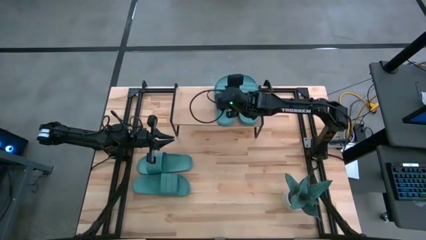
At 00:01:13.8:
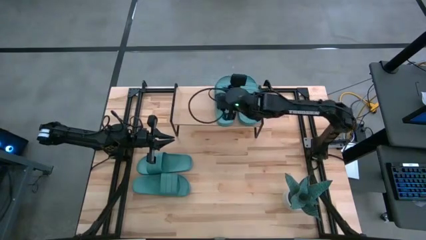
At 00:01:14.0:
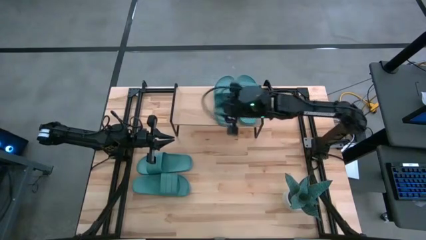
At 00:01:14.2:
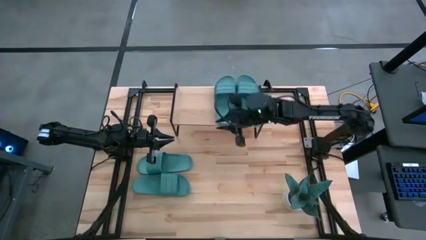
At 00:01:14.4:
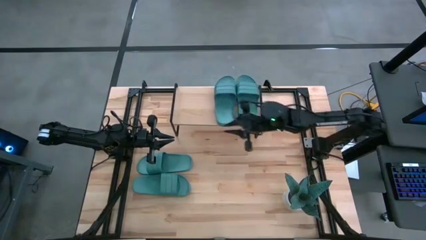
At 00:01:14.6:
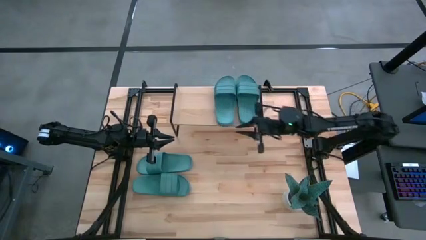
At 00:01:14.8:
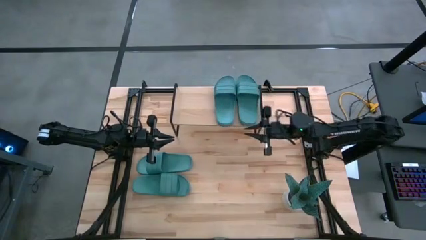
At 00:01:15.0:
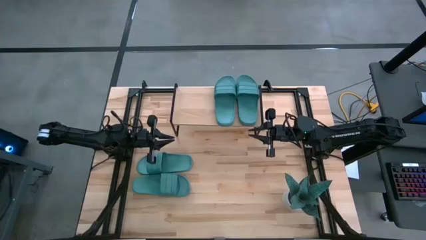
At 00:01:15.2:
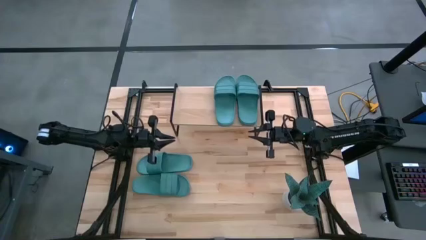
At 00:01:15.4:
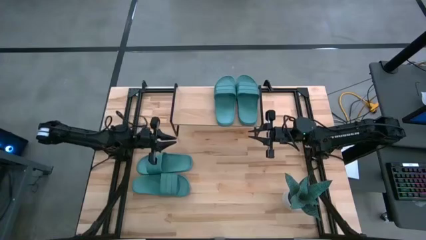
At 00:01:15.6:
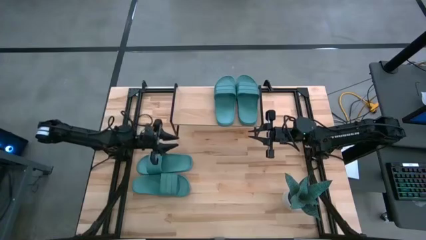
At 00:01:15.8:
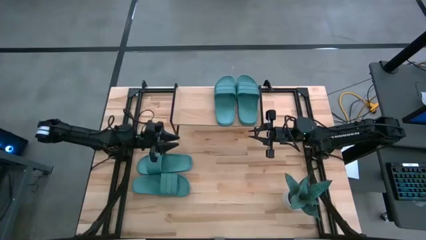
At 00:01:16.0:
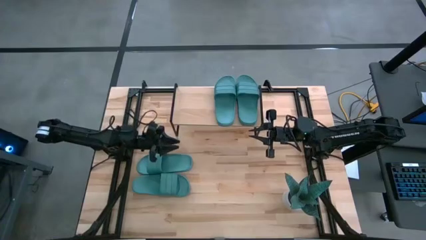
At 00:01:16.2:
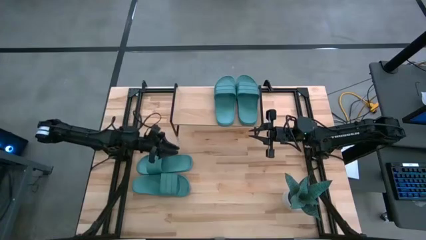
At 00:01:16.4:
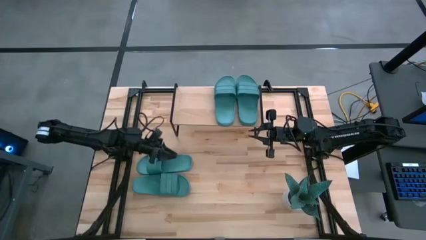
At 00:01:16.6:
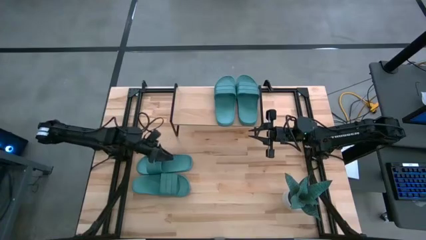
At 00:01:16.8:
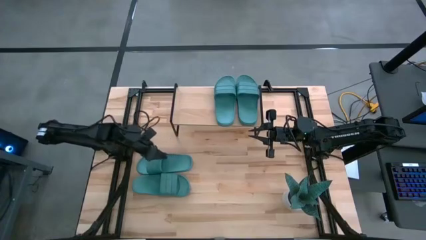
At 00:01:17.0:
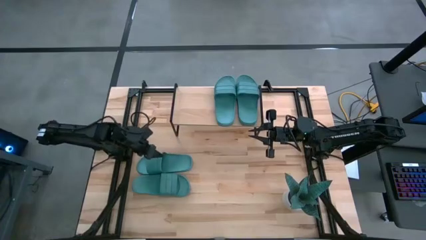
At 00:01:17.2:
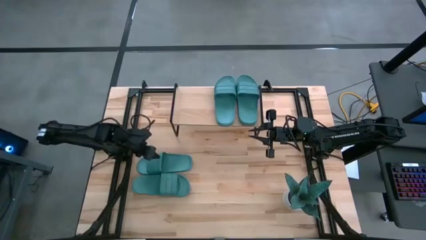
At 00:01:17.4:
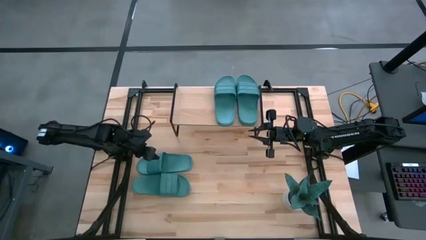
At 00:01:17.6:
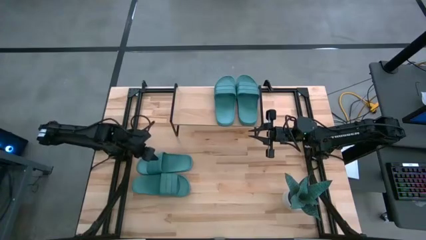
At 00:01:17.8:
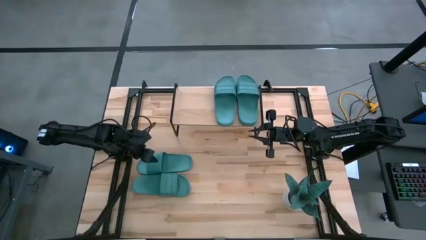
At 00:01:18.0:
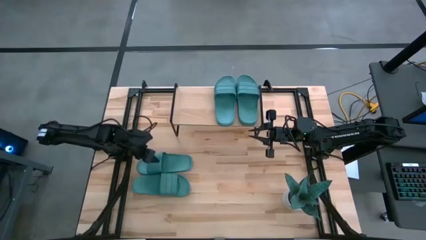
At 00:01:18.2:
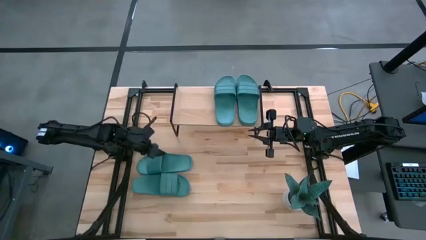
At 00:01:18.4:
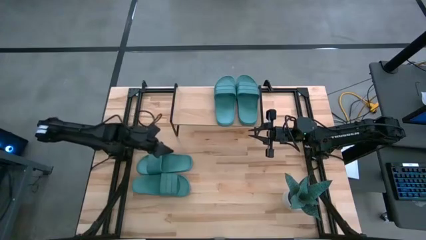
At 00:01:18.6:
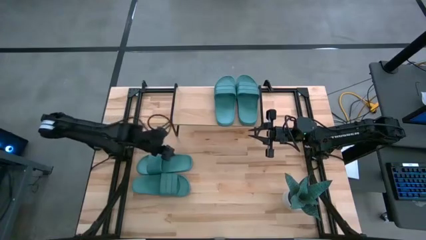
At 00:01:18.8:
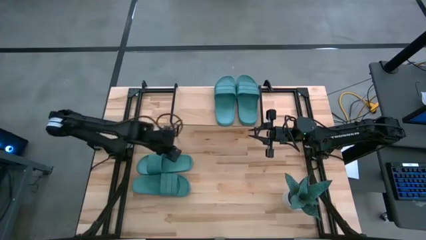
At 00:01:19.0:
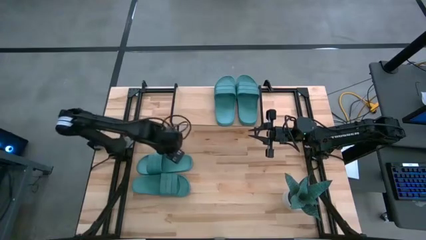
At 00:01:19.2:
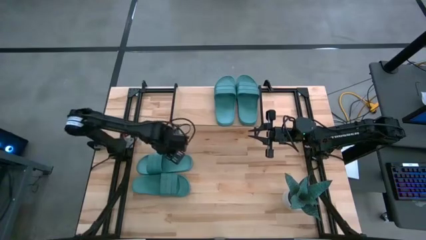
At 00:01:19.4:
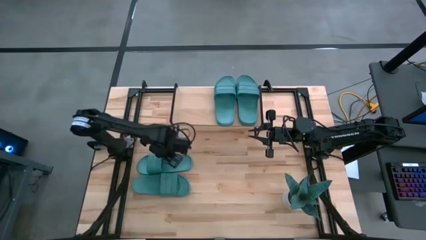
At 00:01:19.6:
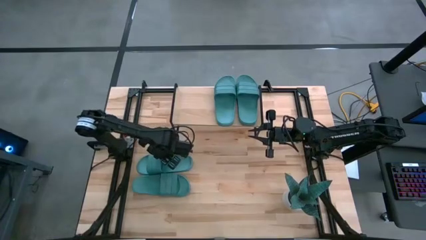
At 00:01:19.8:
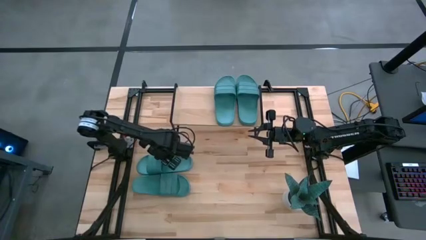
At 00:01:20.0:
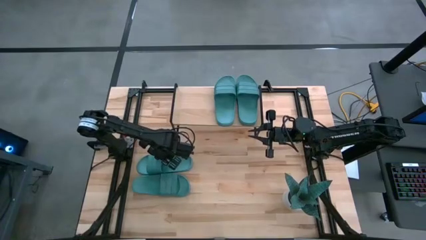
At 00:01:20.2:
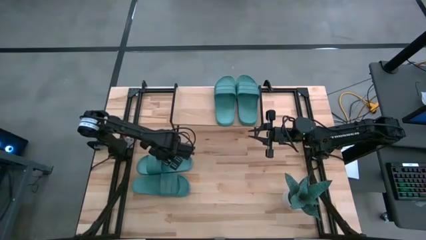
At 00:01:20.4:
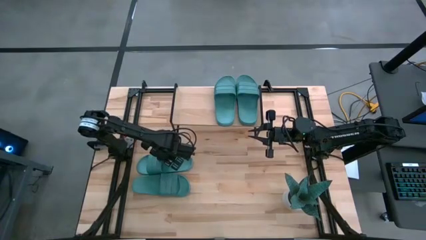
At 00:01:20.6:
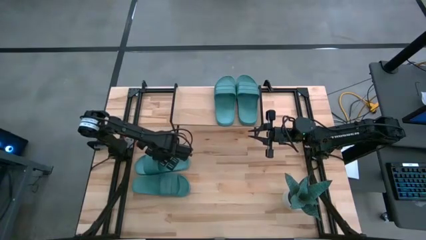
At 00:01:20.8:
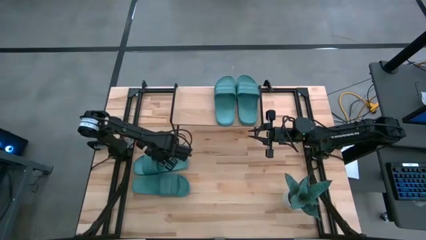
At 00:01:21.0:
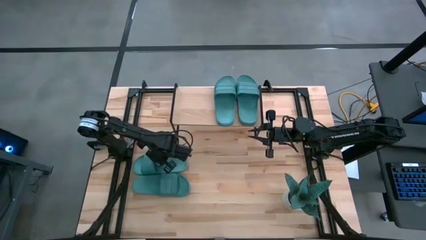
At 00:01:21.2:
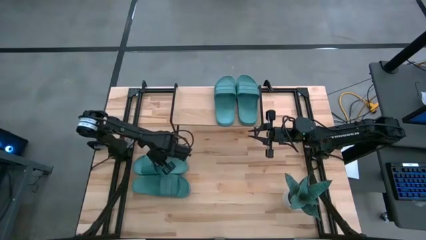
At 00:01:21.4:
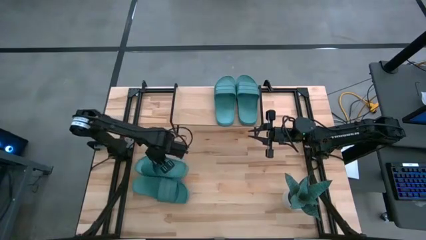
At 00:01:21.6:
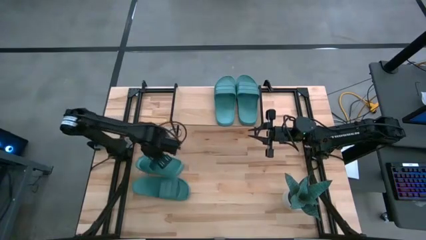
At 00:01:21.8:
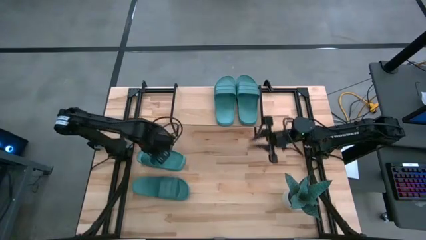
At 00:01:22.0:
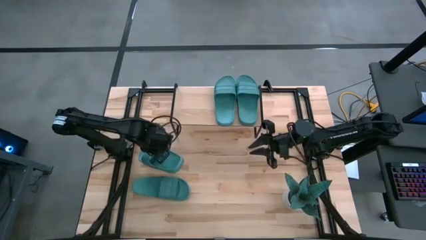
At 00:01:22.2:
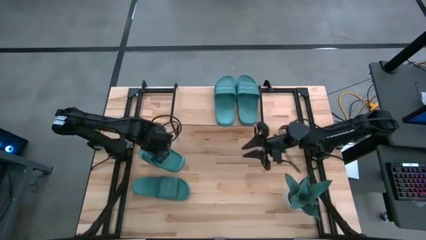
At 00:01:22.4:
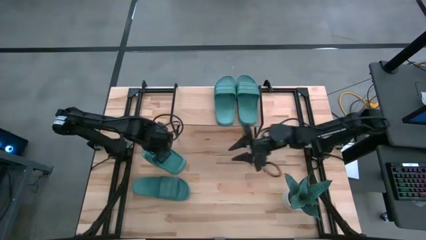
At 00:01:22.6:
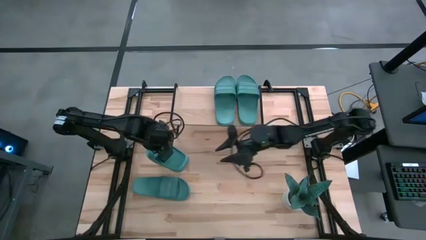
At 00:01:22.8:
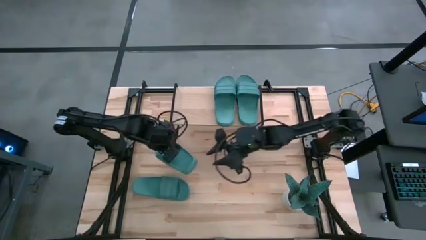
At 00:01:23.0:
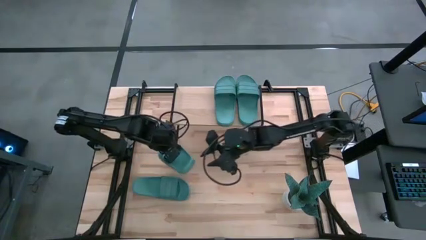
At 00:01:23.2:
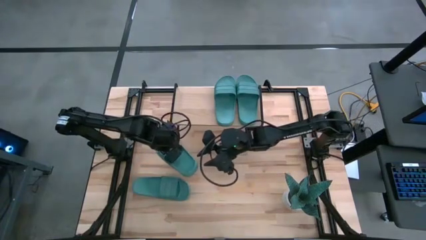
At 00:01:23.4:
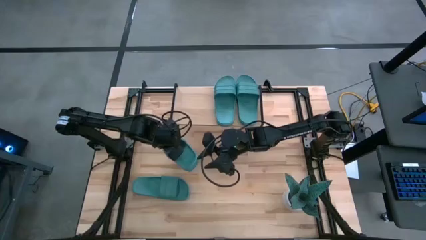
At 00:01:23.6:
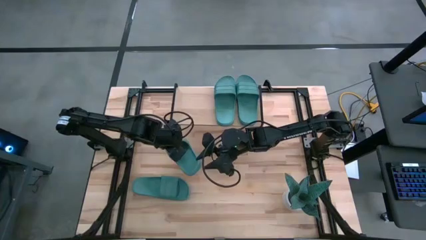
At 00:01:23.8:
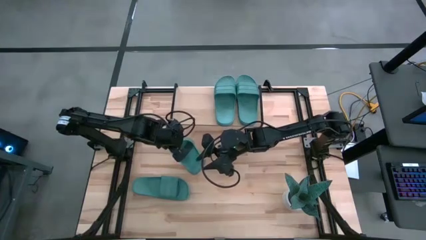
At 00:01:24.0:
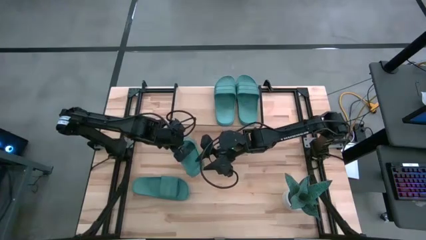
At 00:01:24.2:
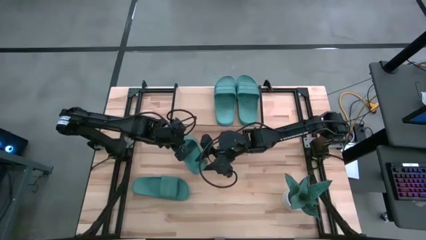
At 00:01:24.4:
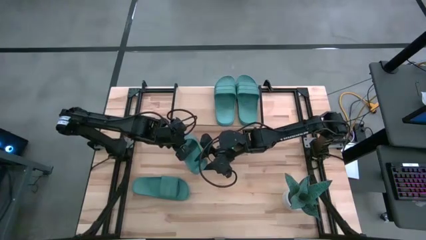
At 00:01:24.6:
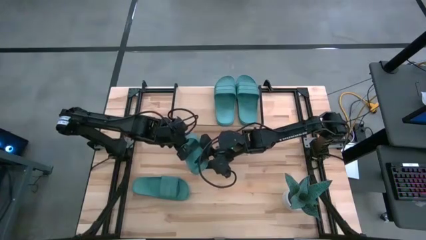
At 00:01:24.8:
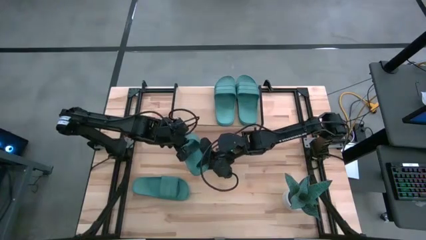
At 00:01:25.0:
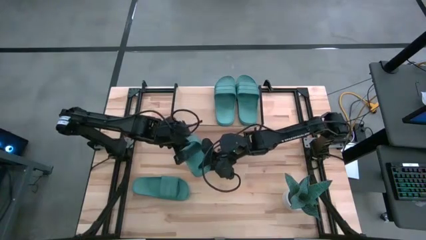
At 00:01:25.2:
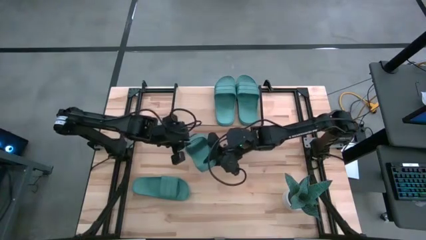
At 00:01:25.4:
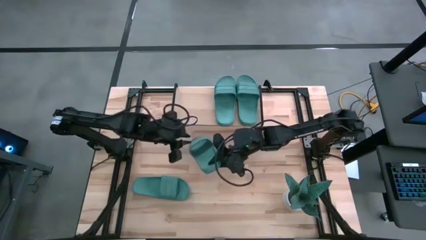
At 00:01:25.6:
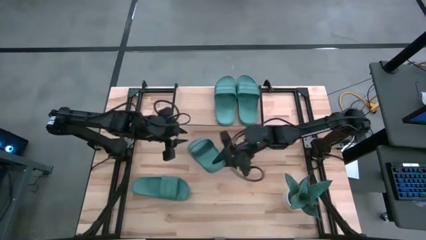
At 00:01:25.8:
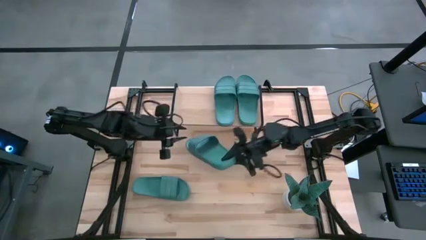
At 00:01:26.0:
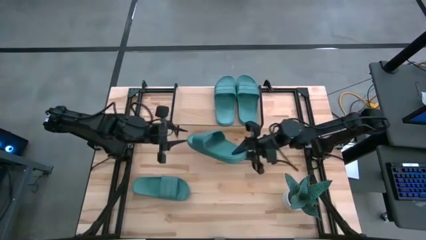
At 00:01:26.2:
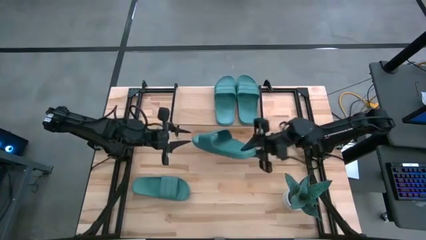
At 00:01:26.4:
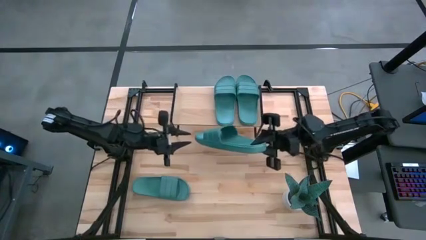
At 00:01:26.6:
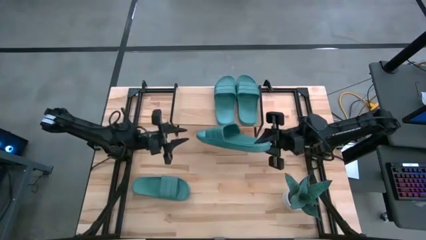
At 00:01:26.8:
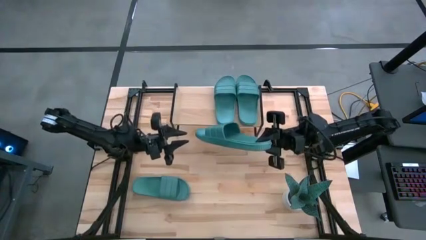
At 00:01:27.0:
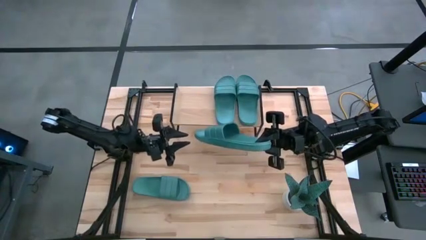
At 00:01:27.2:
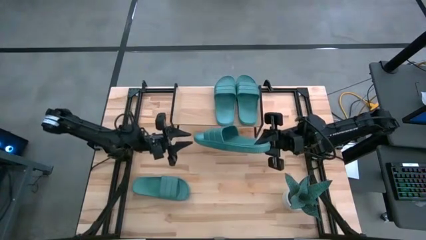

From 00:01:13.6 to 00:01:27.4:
Task: Pick and place slides into the shelf
Put the green slides on the shelf

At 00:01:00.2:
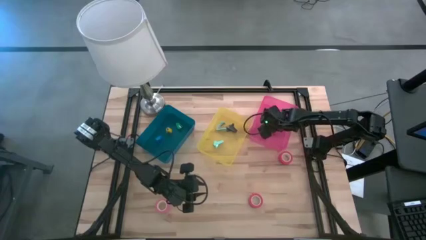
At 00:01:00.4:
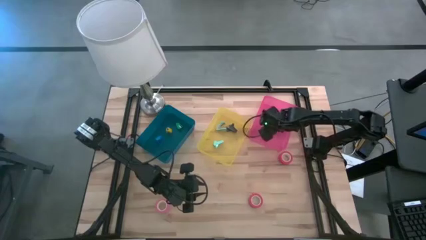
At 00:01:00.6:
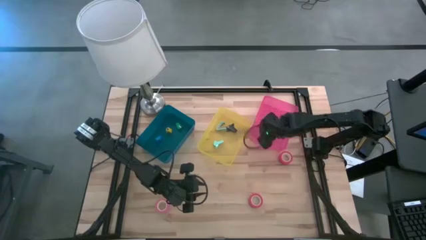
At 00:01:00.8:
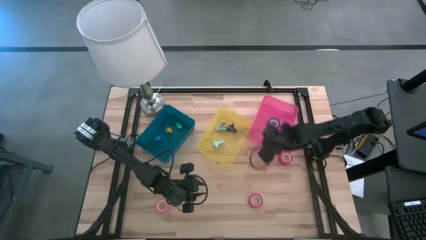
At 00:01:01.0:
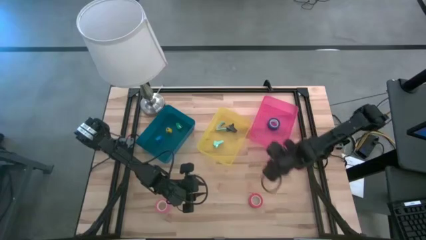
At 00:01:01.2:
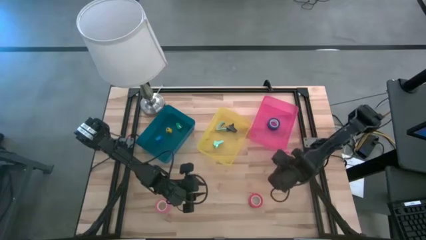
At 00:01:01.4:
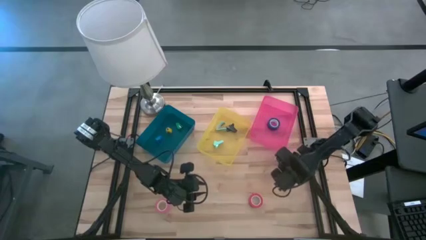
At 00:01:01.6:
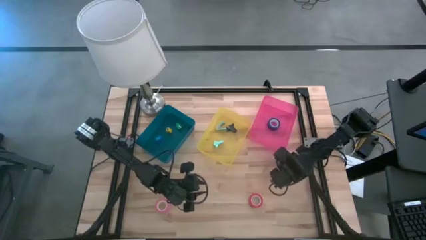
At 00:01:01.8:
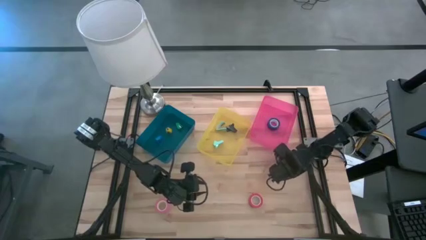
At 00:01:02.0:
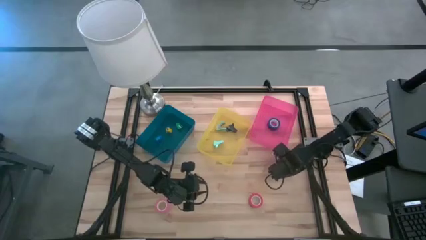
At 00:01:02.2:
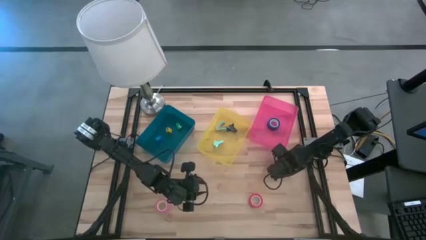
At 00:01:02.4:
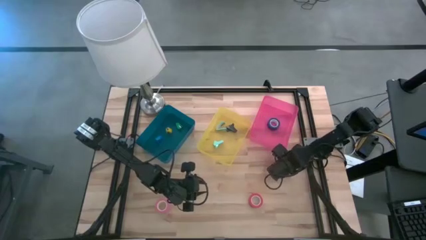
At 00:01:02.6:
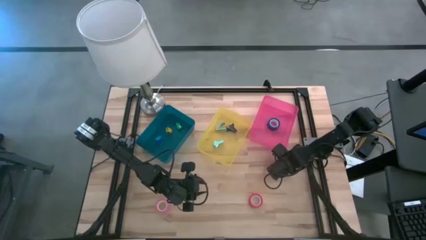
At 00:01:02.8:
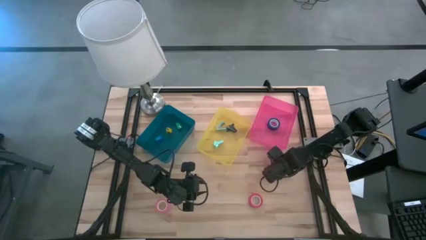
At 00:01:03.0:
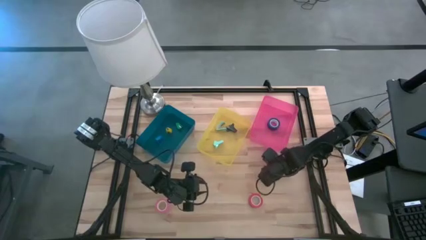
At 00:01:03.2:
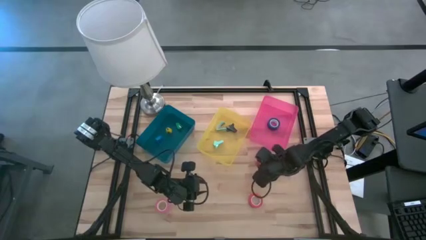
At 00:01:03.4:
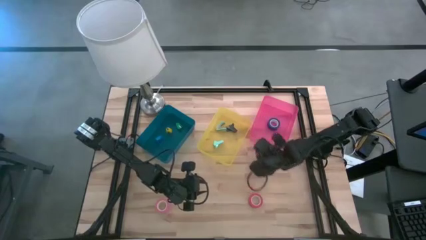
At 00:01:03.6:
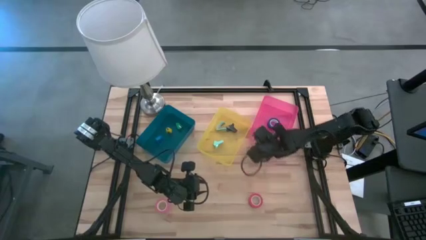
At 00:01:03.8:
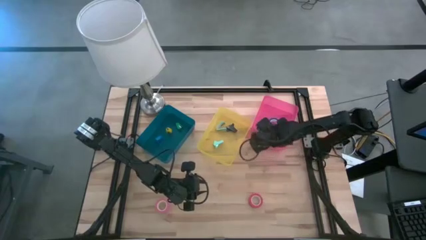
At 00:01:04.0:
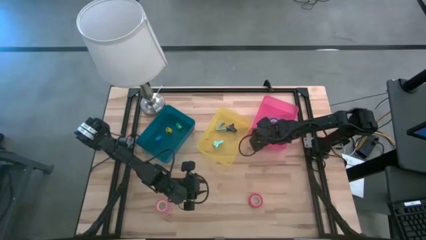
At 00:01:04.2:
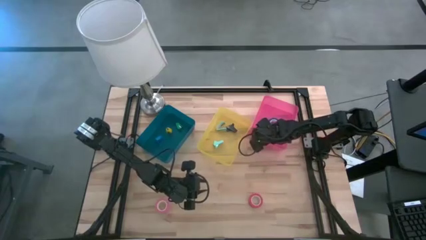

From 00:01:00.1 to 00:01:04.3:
Task: Pick and place Stapler, Stapler remover, tape
Put the top red tape into the pink bin
